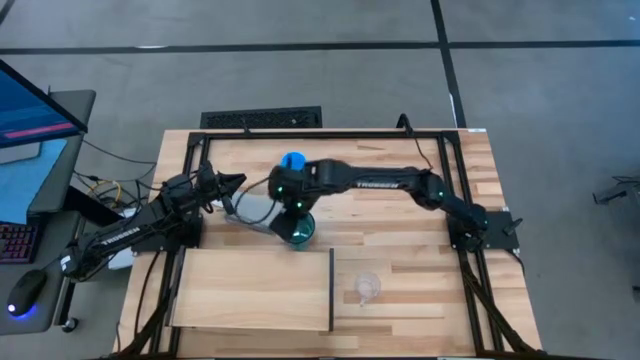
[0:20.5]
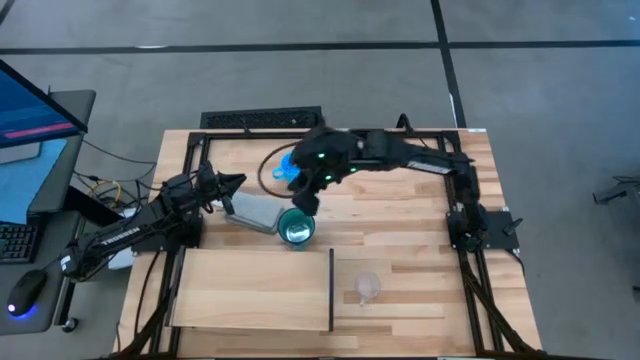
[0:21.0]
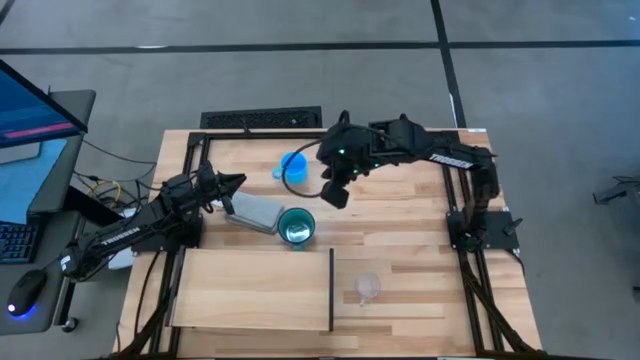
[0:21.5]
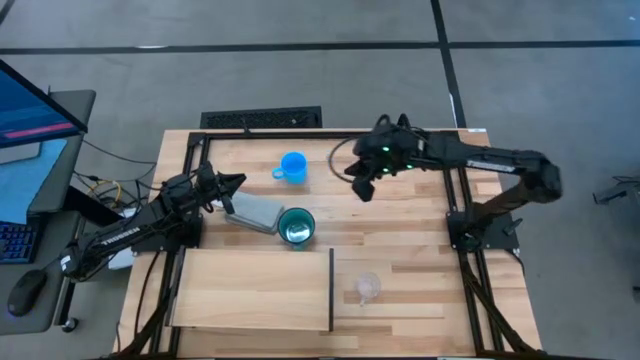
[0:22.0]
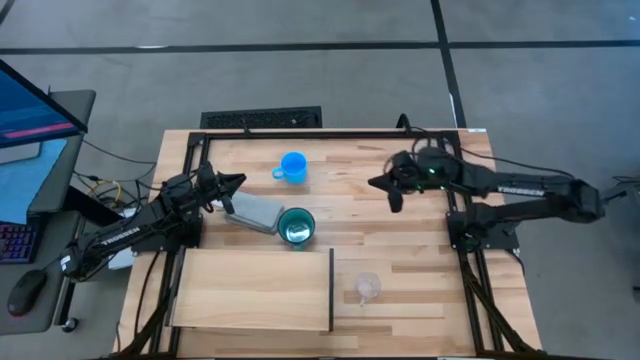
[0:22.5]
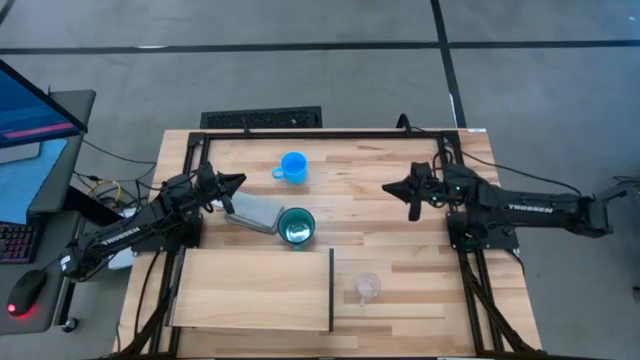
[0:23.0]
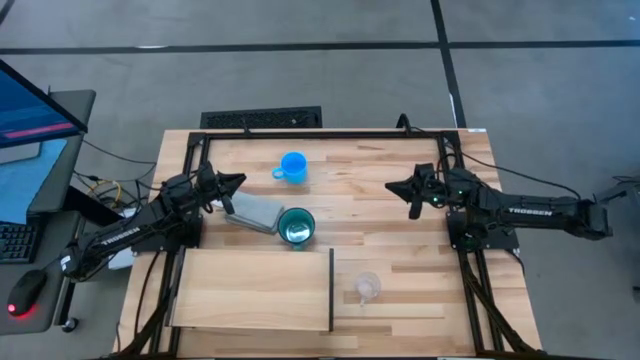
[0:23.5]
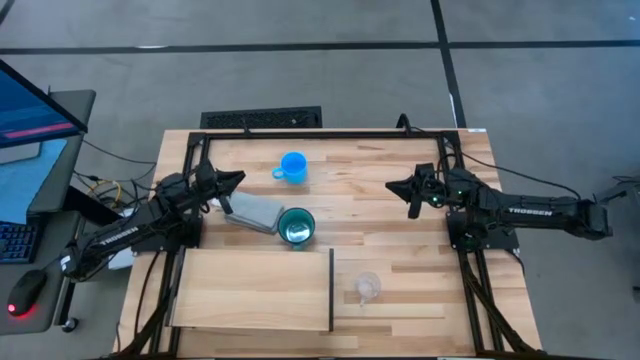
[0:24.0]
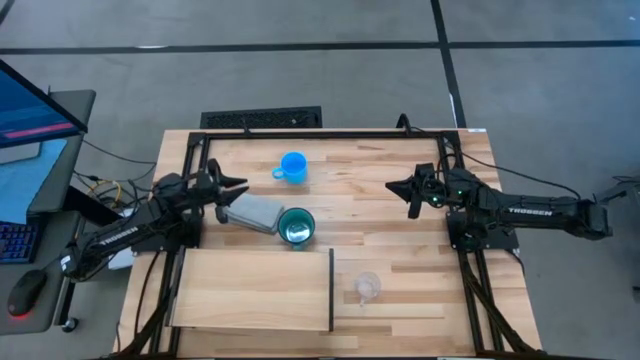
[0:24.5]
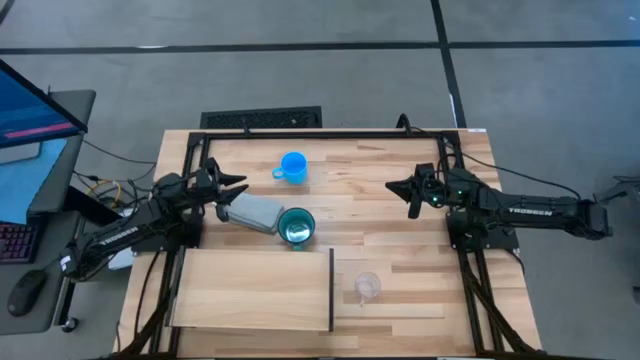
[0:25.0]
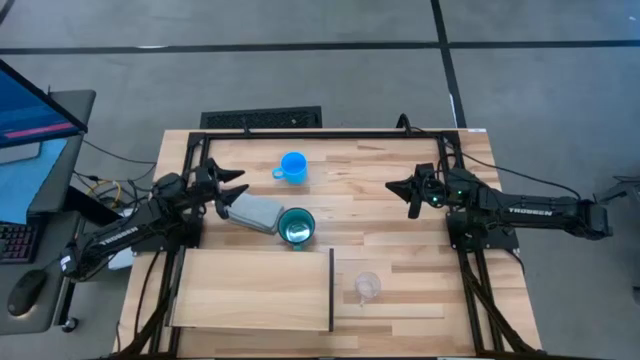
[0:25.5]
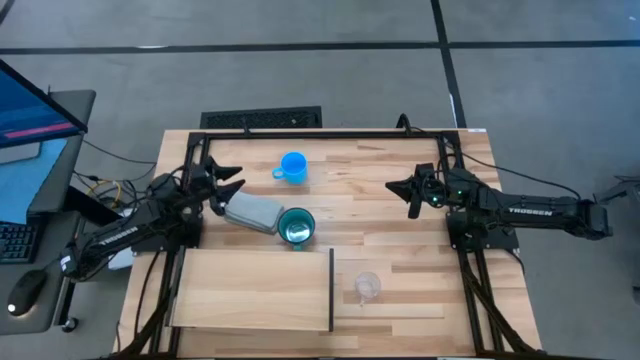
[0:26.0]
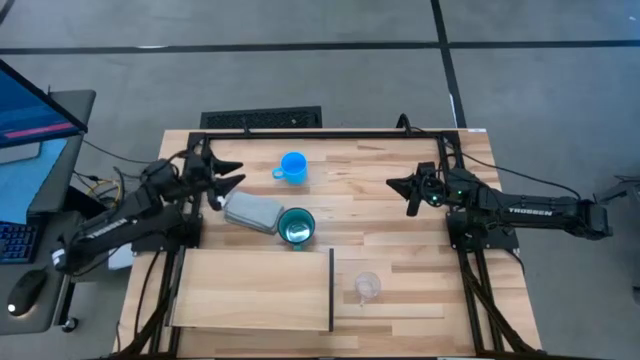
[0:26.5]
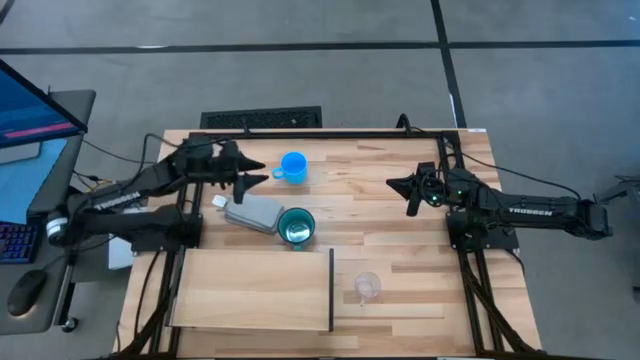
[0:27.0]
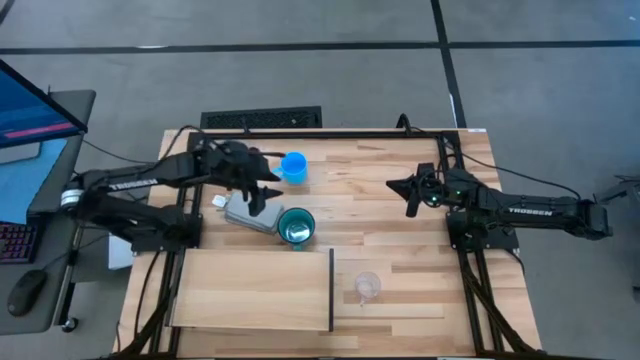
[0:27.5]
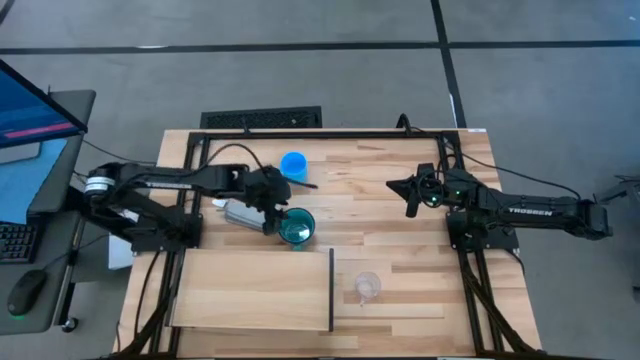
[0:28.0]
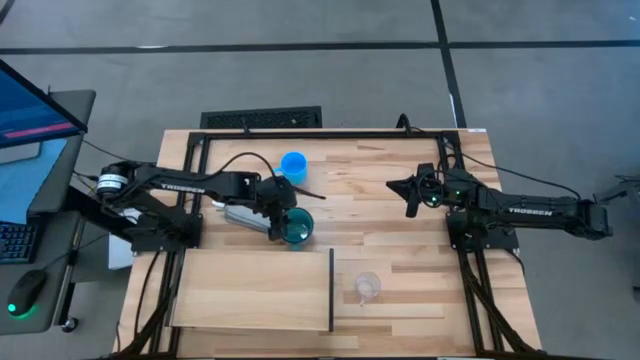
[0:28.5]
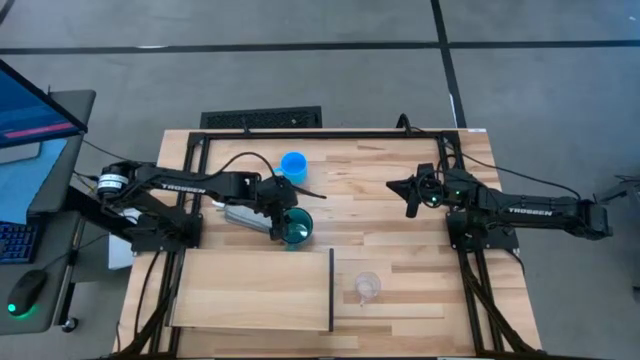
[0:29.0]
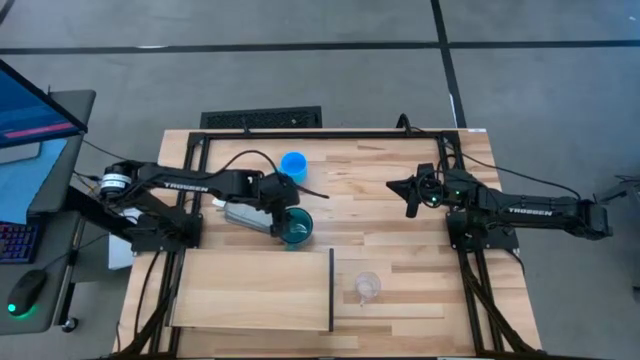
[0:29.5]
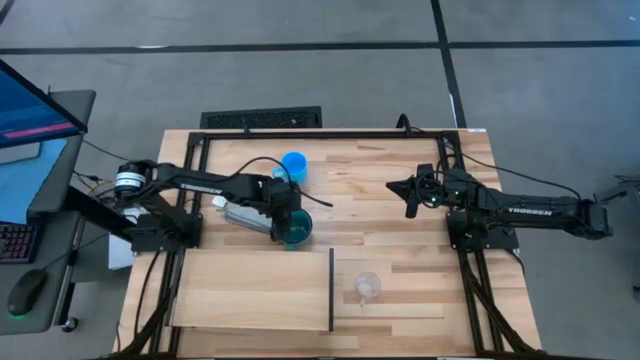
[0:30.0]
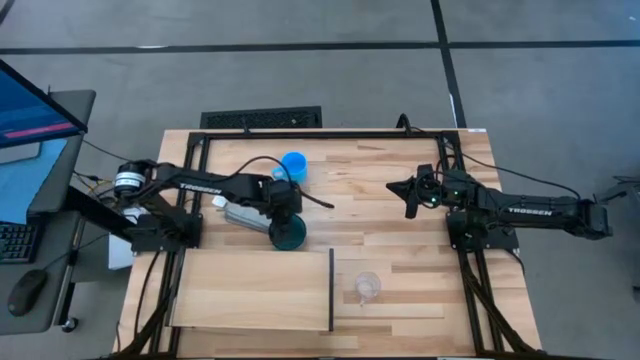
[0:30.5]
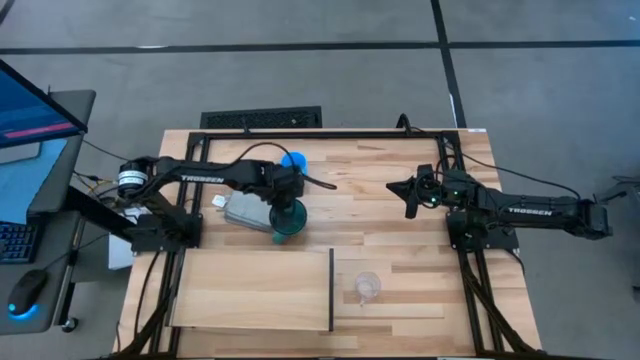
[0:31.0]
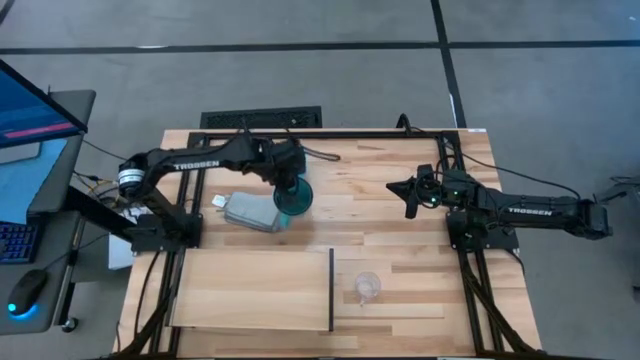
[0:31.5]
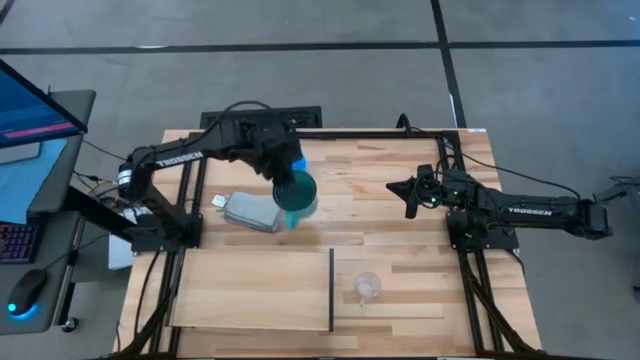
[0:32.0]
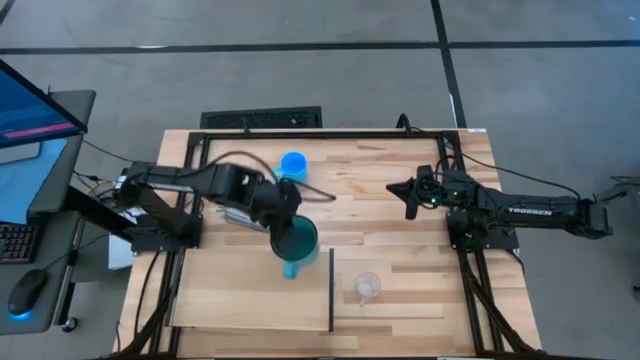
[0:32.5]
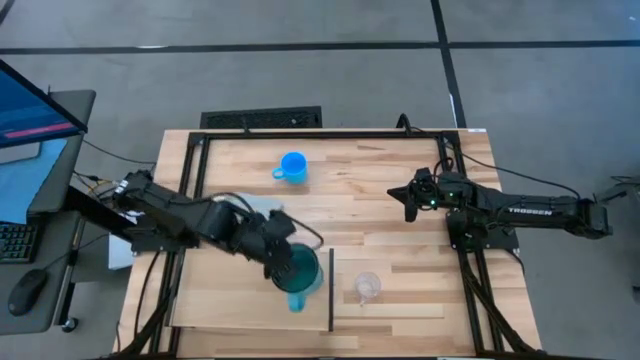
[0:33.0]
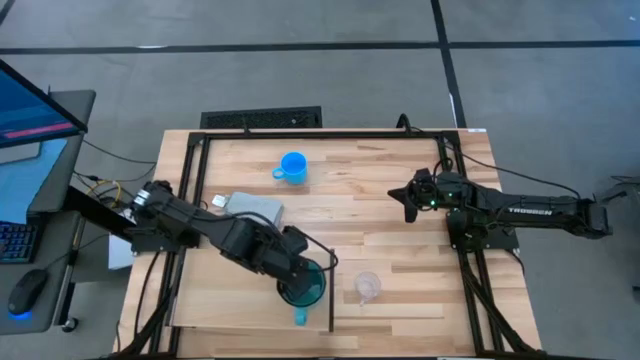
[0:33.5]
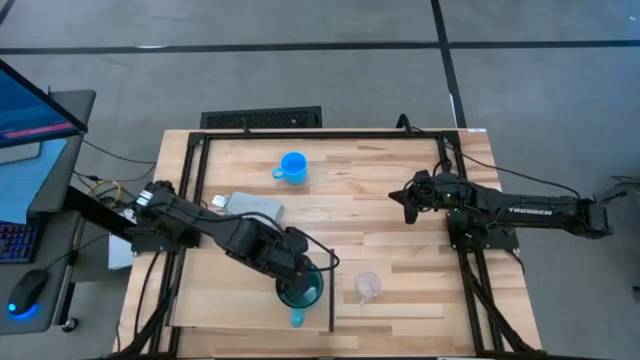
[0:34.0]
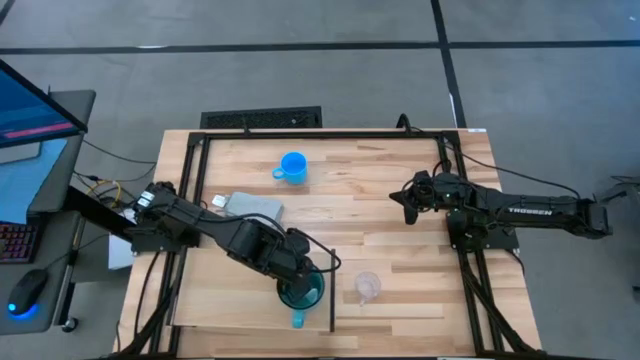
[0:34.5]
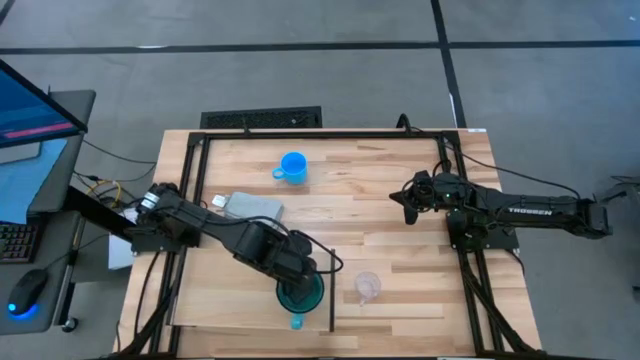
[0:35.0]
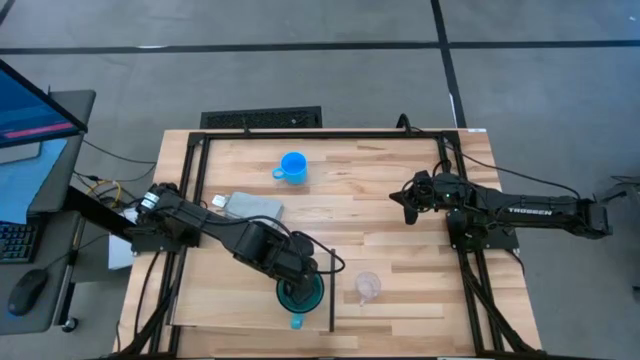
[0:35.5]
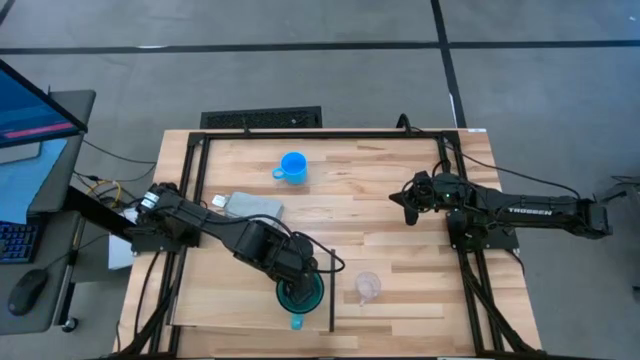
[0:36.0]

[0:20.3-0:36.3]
Task: Stack small to large cups/mugs on shelf
Put the green mug on the shelf

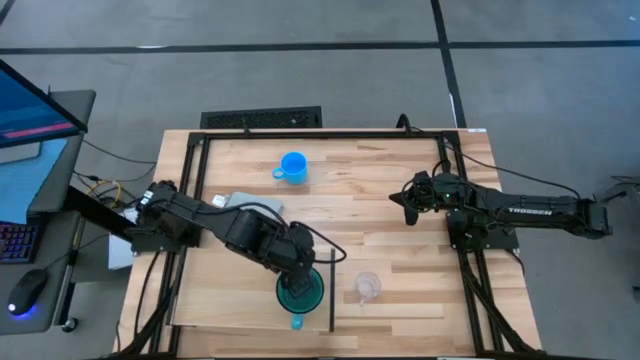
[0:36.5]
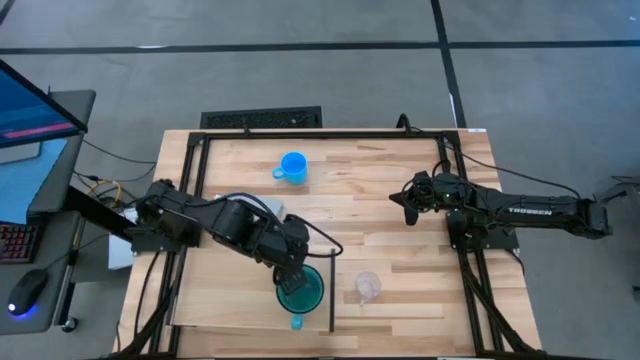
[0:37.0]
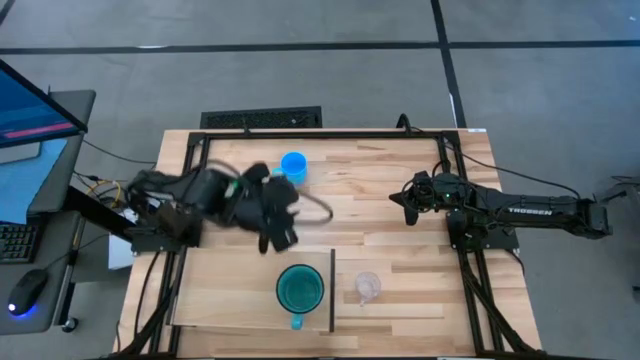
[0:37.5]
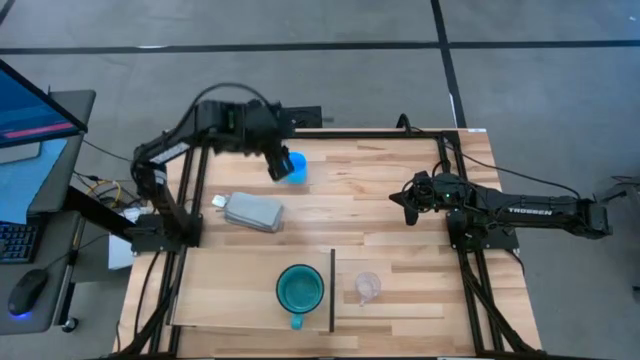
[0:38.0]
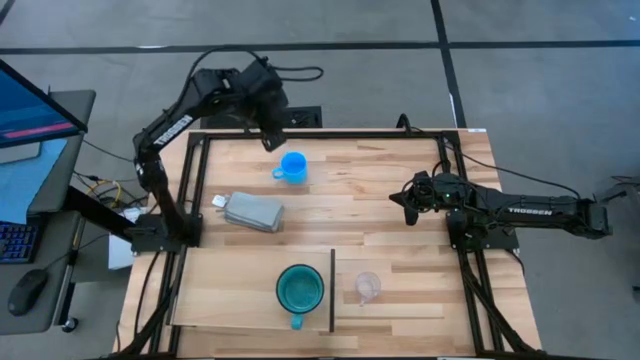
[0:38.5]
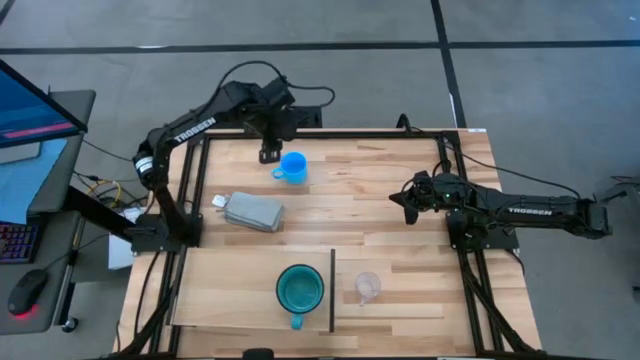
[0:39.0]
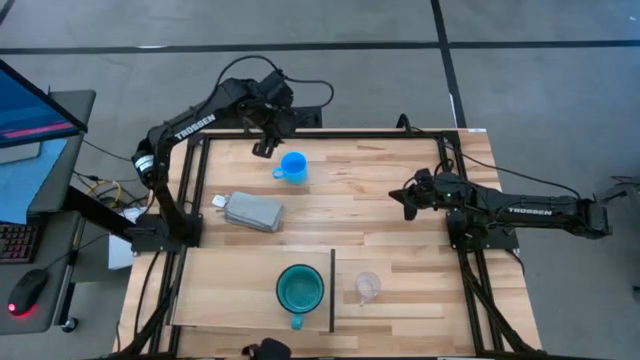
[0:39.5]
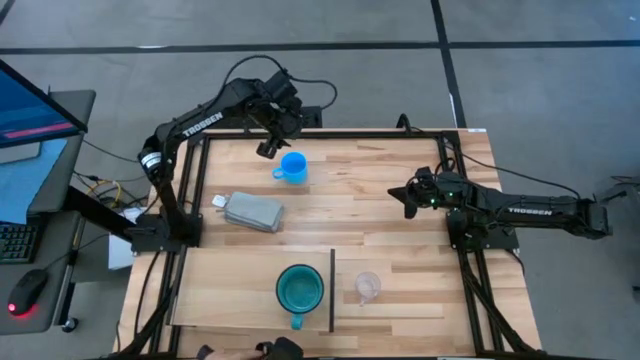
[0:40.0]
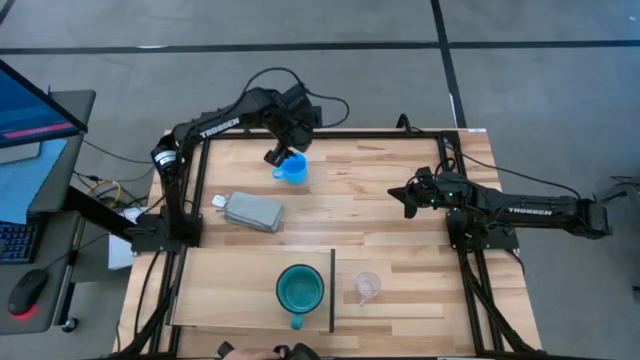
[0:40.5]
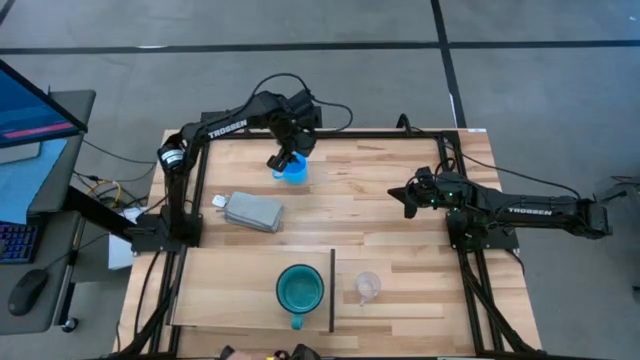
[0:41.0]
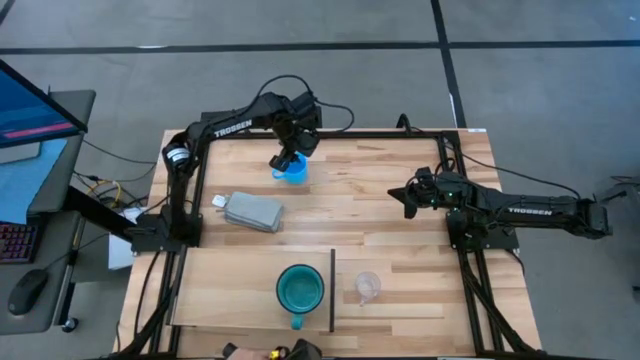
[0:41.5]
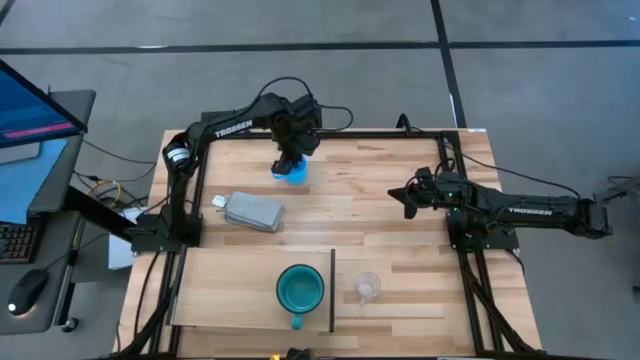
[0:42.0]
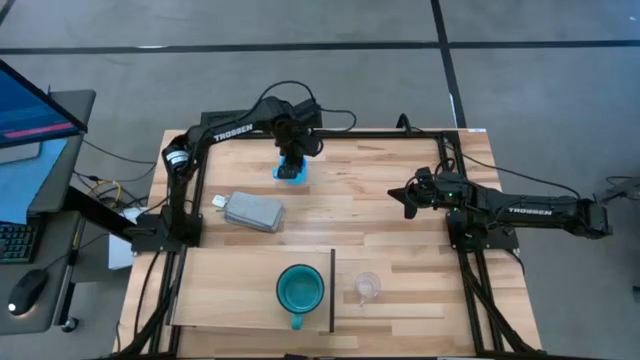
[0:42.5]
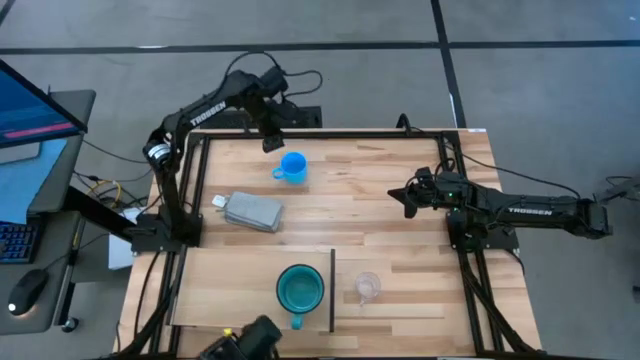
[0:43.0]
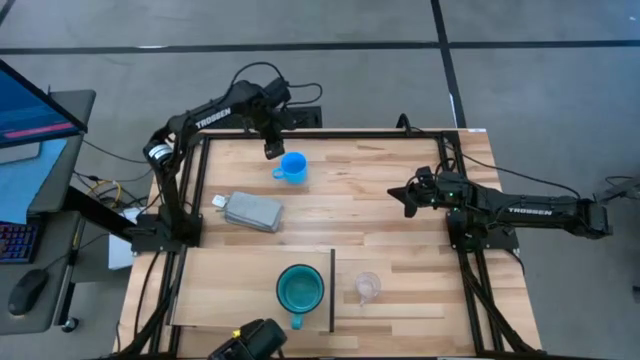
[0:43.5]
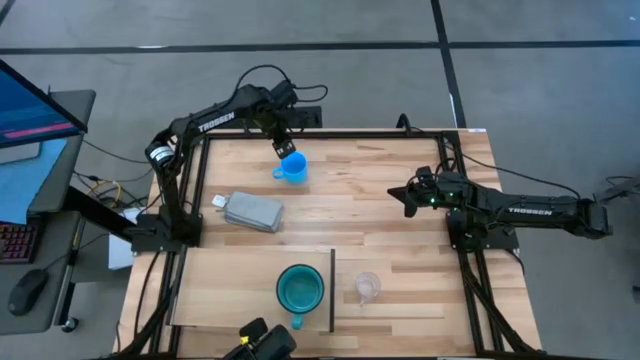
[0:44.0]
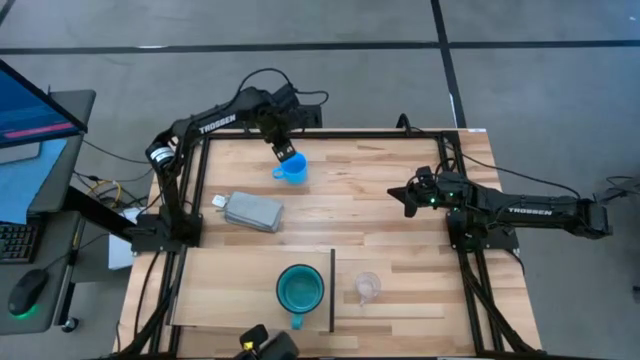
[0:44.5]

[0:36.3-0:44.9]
Put the blue mug on the shelf
